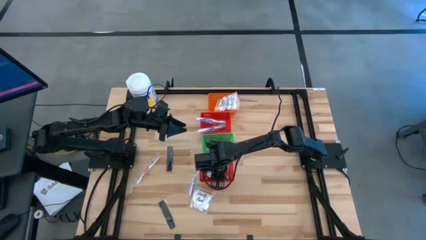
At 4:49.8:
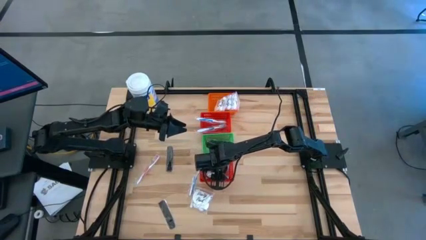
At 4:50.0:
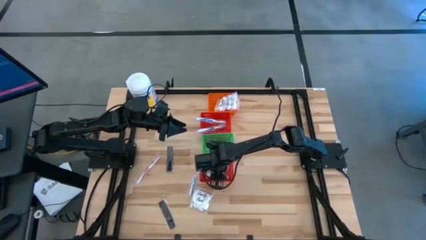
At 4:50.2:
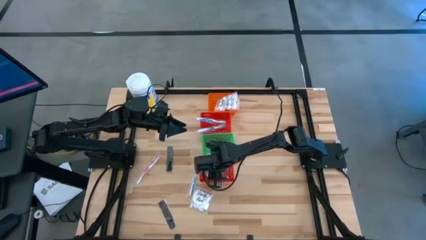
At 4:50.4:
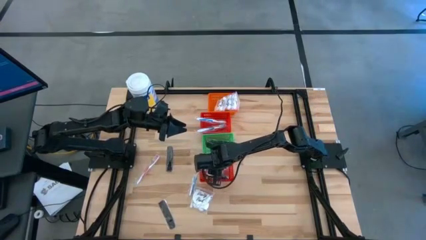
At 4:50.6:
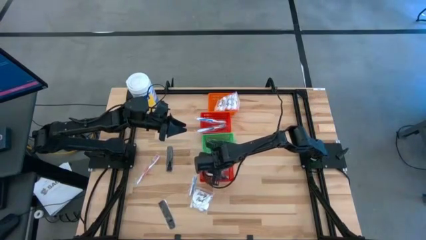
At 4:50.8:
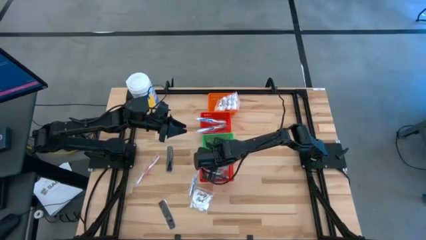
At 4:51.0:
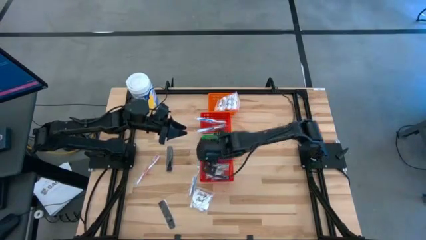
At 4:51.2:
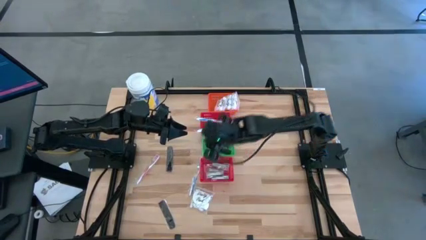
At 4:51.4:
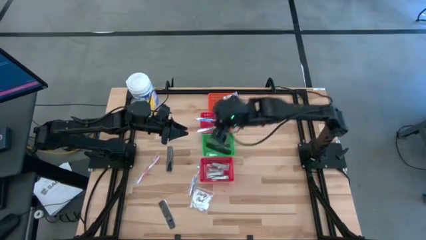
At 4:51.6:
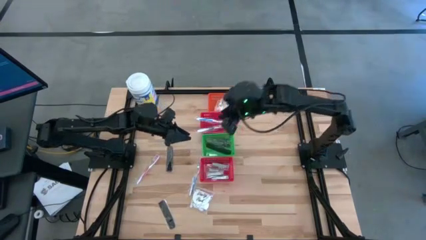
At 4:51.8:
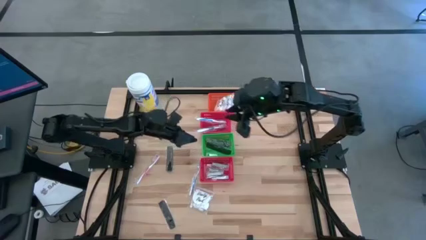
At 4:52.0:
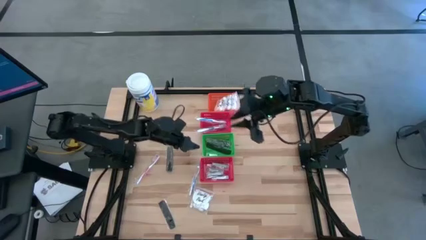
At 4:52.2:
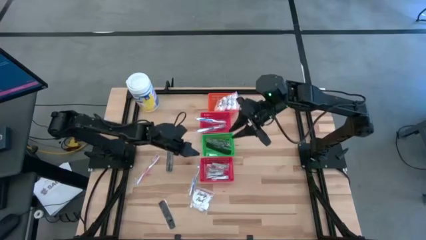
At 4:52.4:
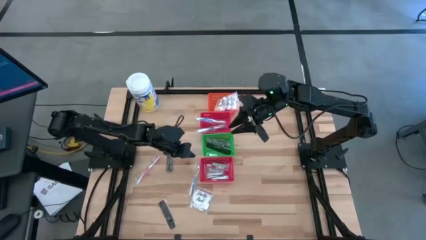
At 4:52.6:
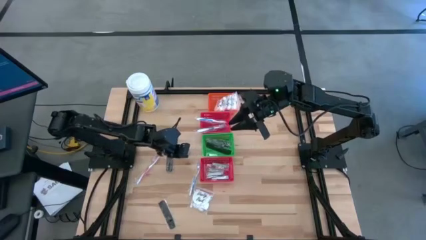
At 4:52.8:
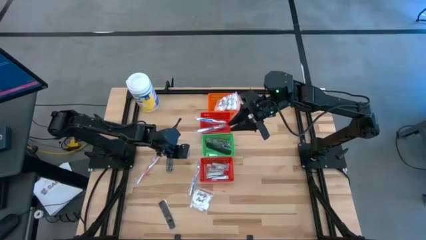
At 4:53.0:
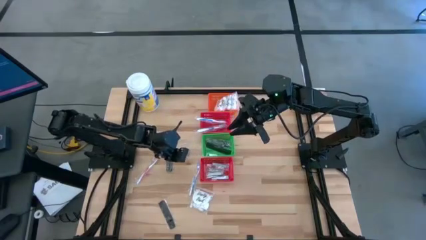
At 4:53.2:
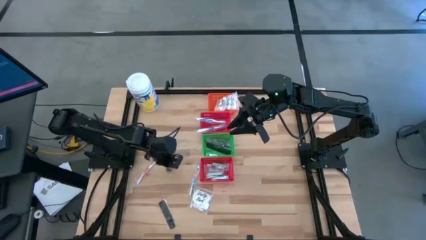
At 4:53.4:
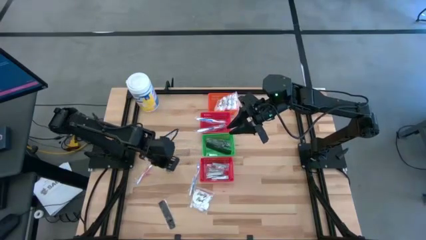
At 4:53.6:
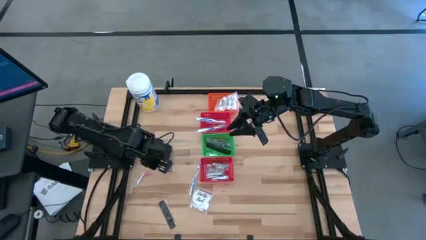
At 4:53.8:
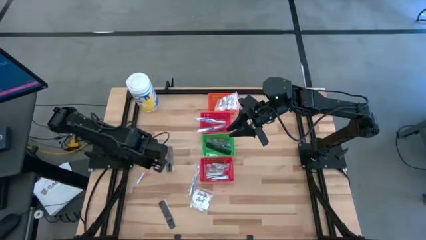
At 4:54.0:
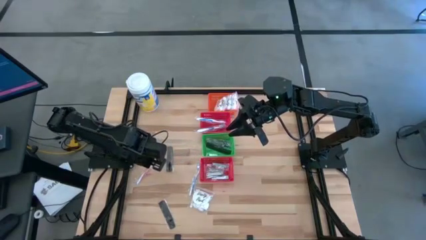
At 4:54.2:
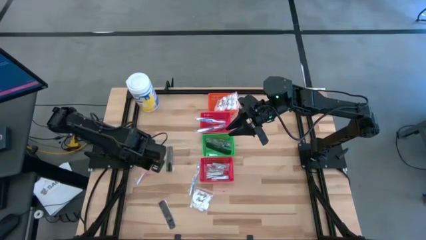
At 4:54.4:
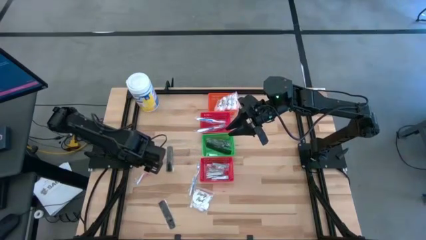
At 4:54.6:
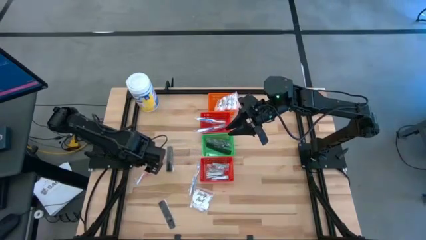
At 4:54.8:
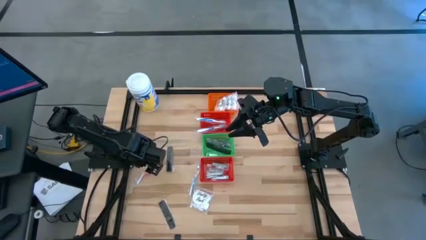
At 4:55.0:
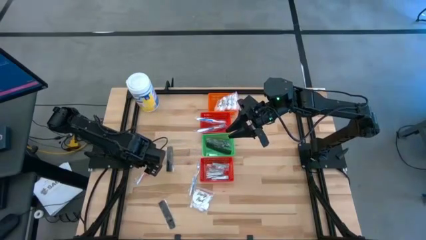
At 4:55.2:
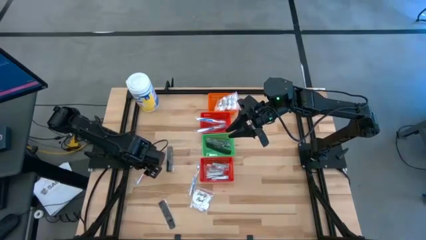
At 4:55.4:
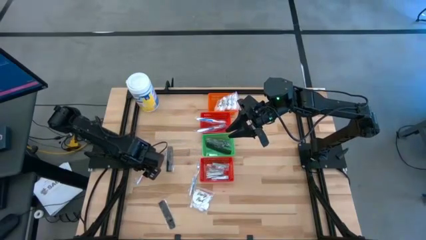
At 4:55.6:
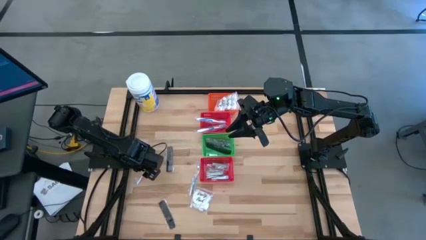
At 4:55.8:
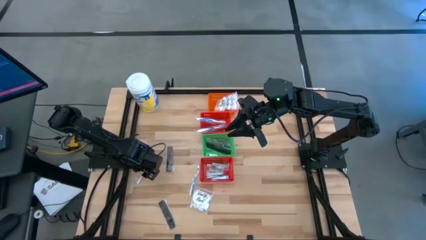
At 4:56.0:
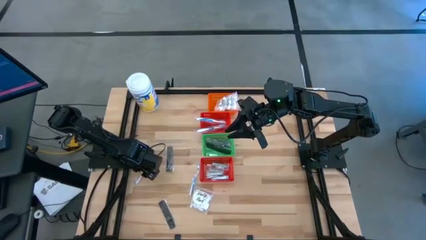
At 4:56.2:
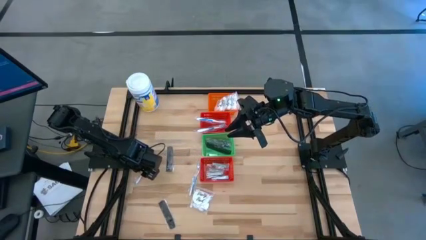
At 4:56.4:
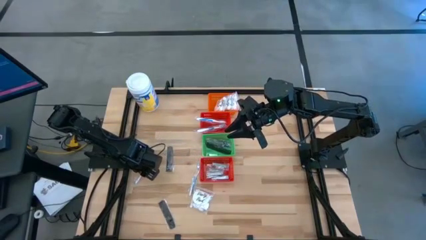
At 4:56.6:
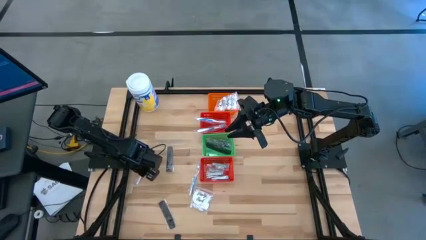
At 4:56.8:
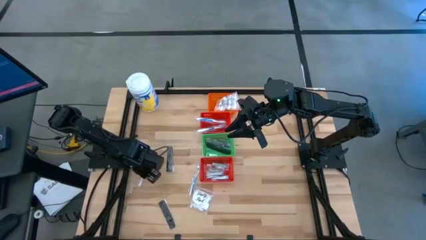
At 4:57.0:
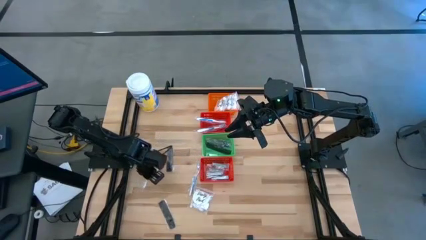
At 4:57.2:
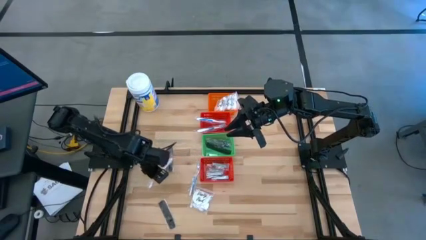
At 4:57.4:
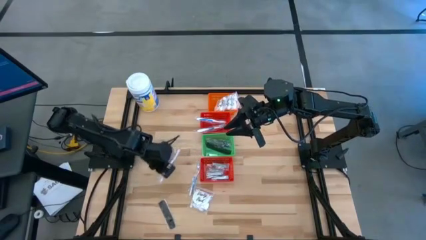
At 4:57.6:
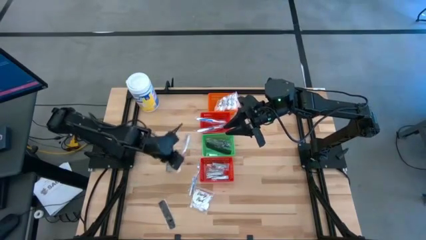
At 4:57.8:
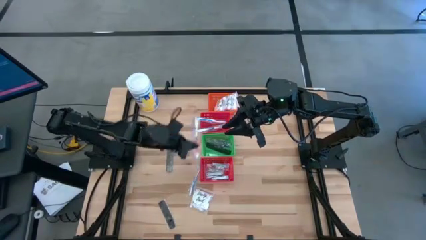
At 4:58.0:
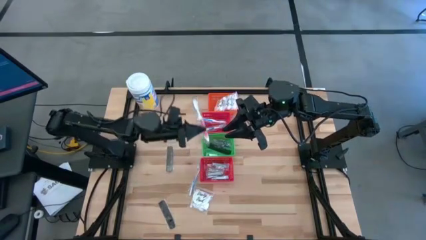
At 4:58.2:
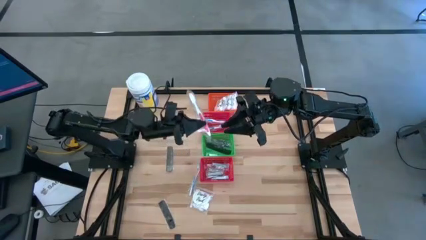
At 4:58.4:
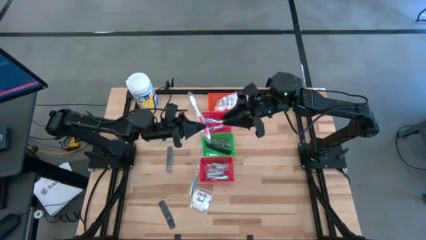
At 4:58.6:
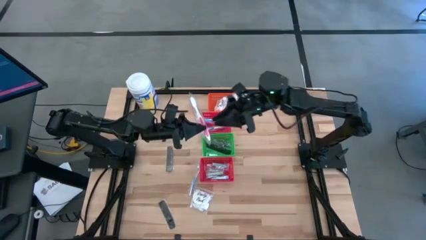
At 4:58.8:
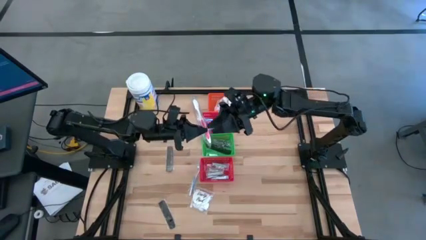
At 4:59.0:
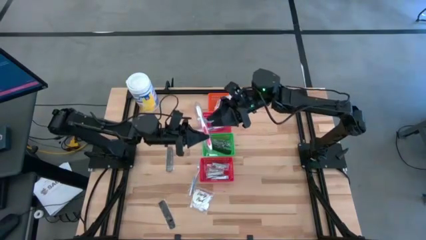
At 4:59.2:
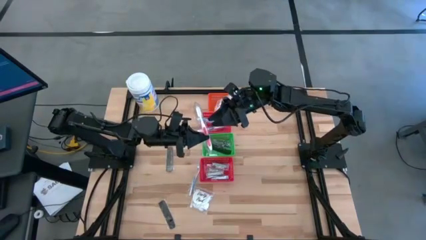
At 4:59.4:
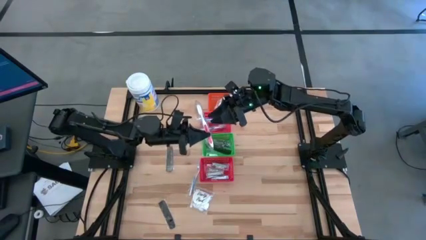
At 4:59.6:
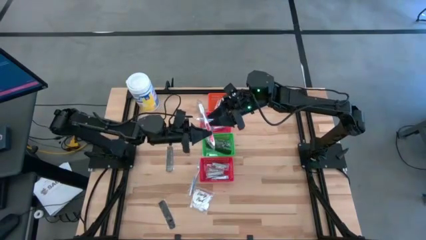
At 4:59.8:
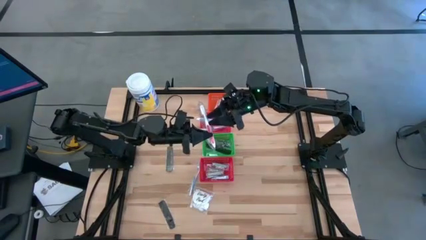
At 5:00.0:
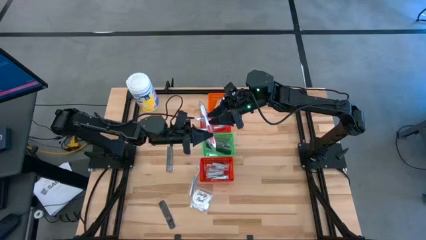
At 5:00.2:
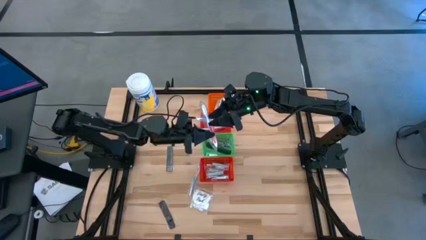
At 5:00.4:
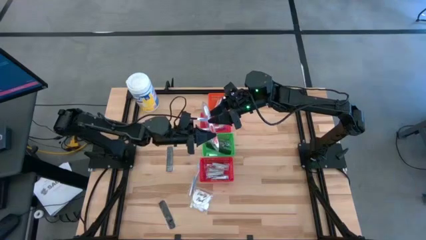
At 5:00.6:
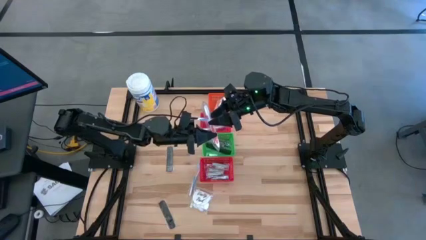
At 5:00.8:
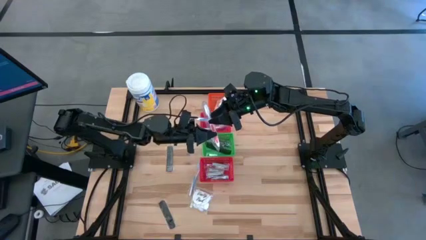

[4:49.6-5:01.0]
Task: Pick & Place Travel size toiletries
Put the orange toothbrush into the top red basket

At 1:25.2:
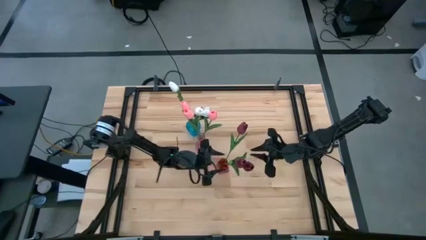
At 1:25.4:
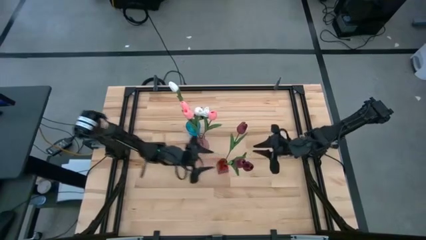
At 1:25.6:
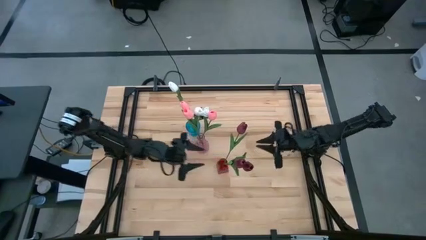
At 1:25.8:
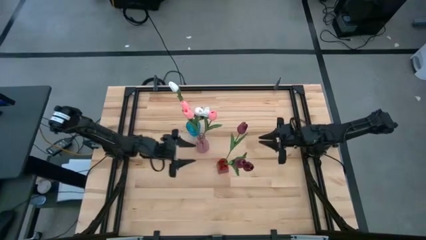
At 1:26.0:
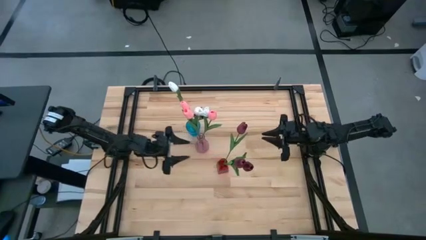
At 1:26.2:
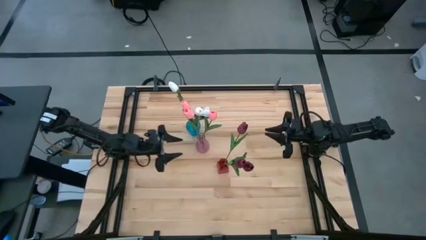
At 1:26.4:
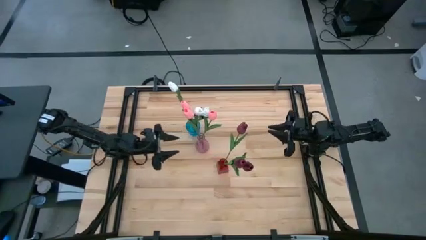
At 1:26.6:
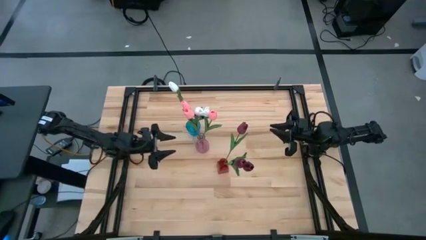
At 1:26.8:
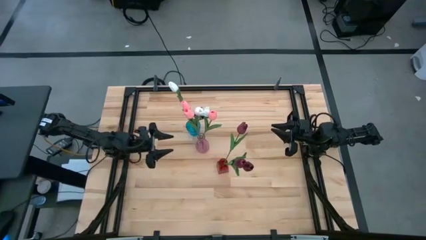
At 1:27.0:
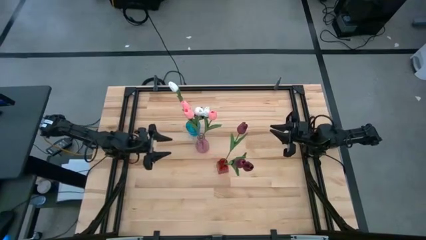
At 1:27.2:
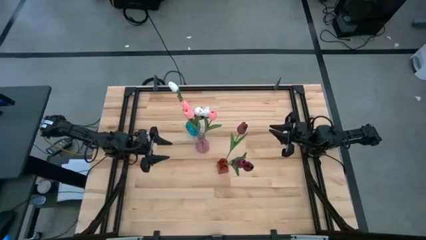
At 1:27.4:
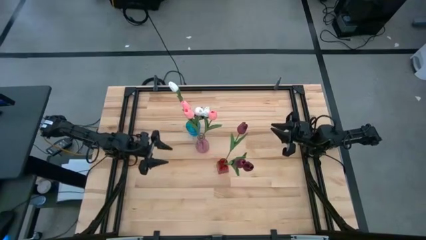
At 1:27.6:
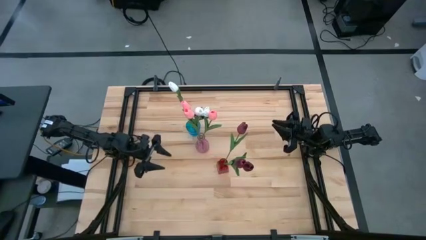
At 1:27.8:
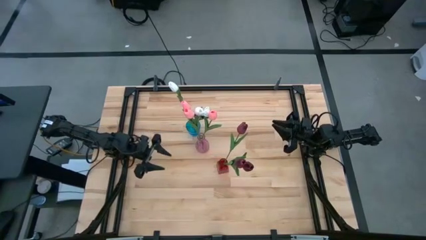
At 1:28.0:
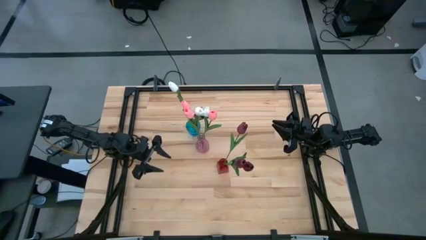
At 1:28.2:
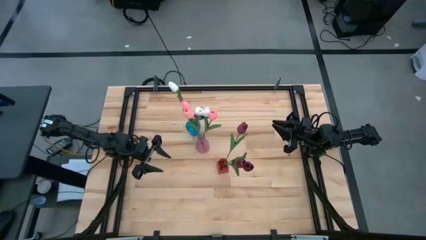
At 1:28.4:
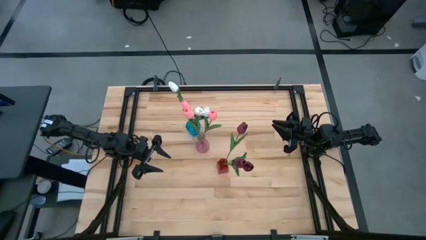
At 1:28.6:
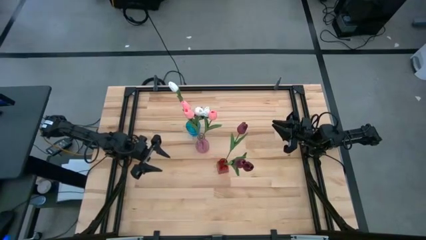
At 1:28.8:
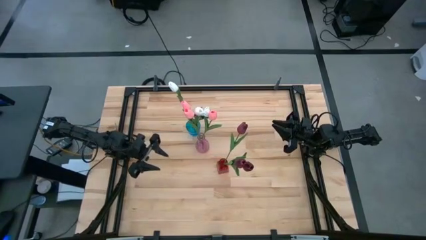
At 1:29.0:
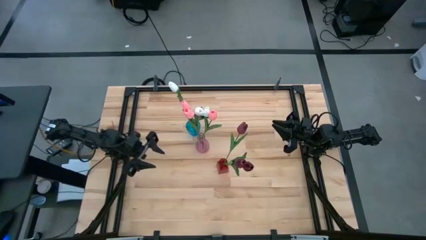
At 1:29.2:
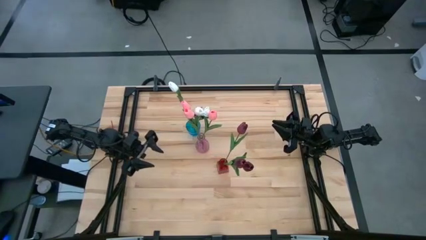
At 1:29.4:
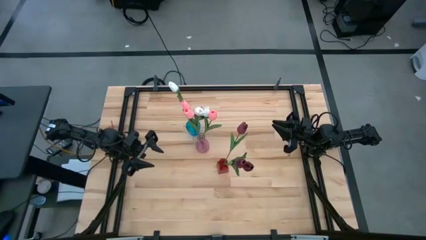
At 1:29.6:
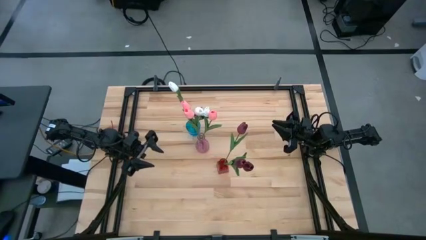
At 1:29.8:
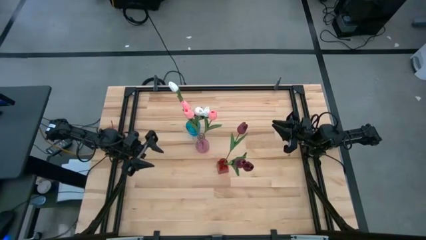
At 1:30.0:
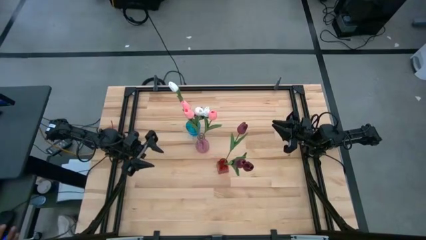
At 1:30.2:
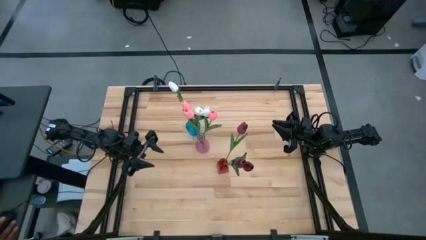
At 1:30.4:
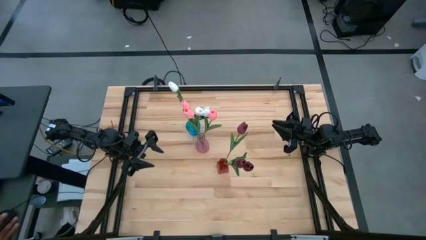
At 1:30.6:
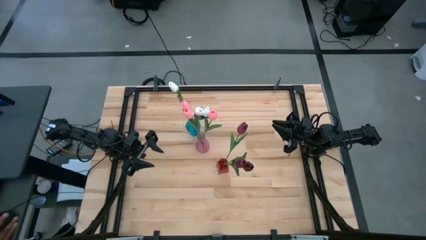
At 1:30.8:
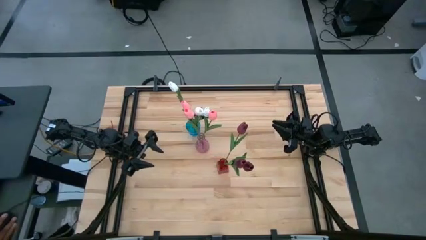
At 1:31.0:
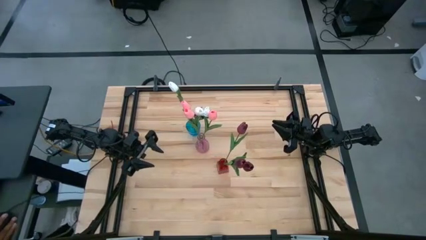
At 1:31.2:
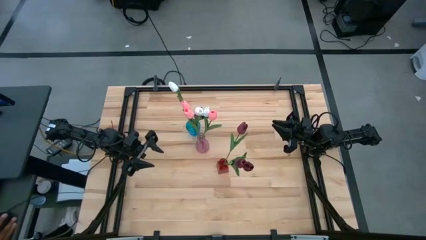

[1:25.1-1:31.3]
Task: Sort flowers into vase by color
Return to Home Position
